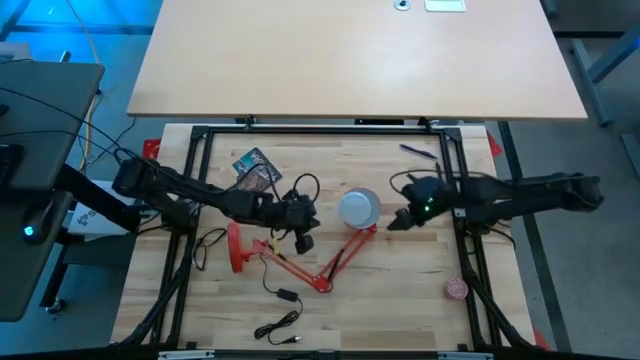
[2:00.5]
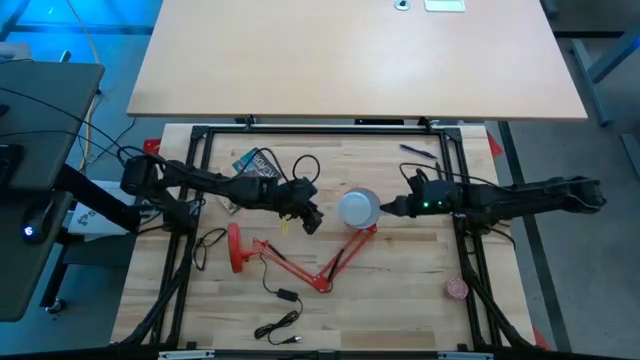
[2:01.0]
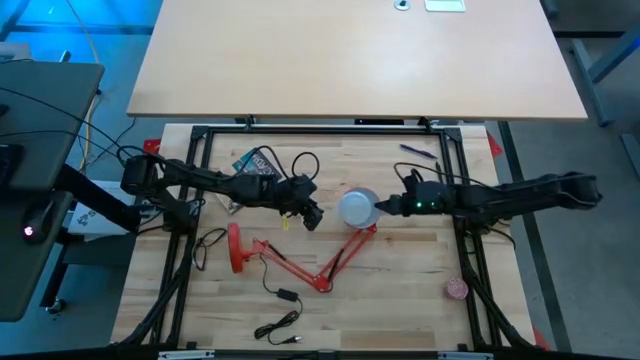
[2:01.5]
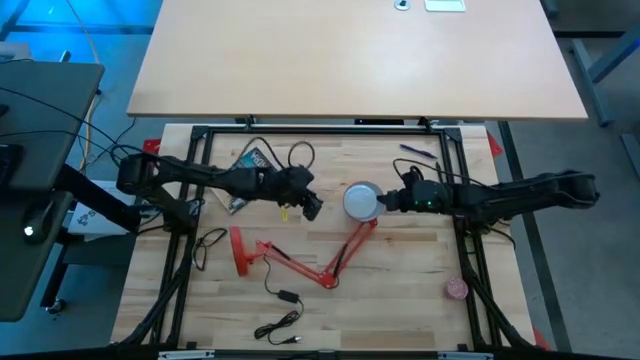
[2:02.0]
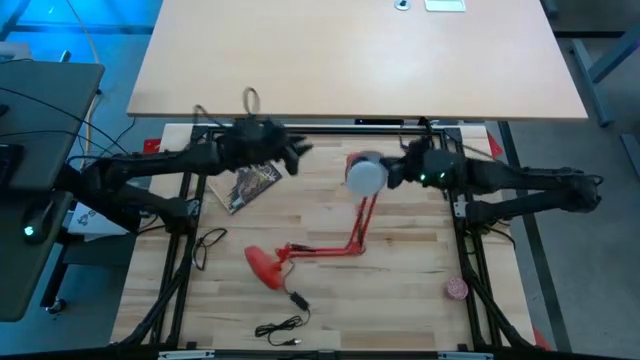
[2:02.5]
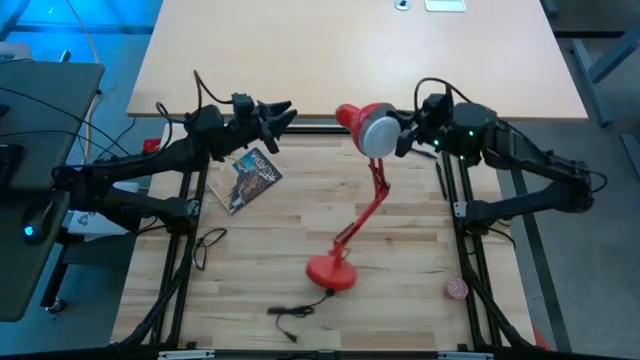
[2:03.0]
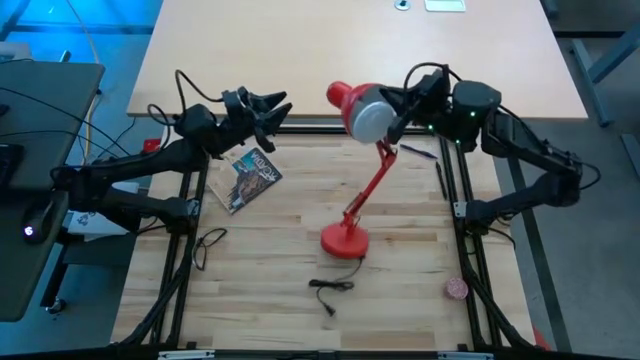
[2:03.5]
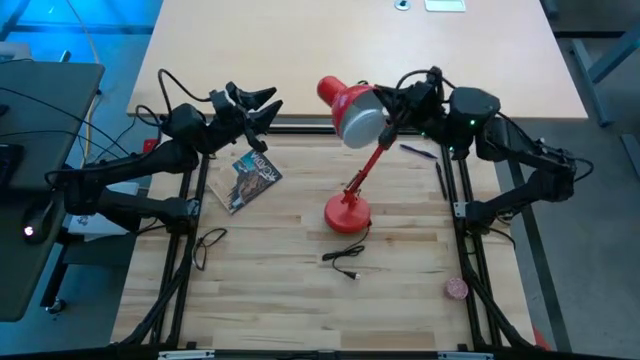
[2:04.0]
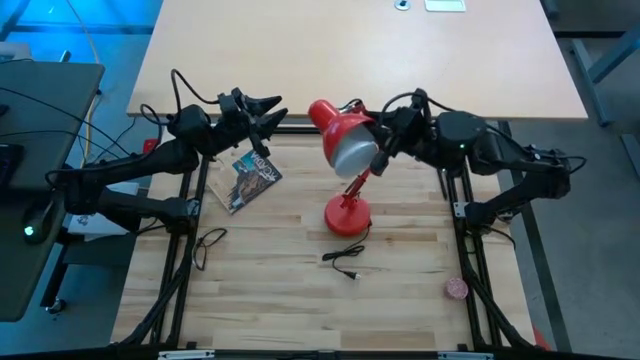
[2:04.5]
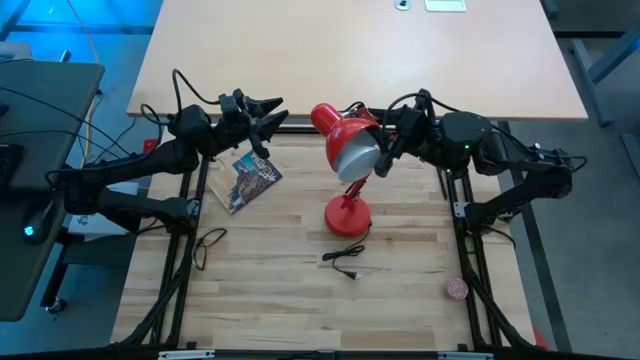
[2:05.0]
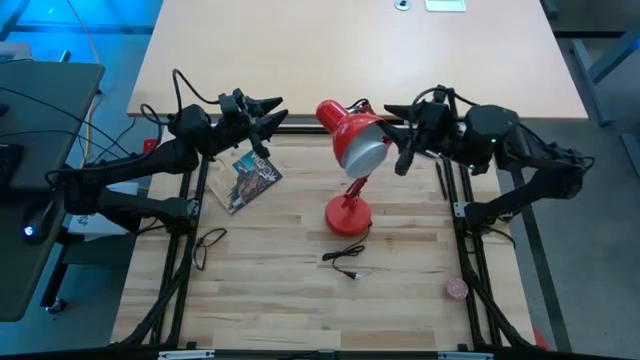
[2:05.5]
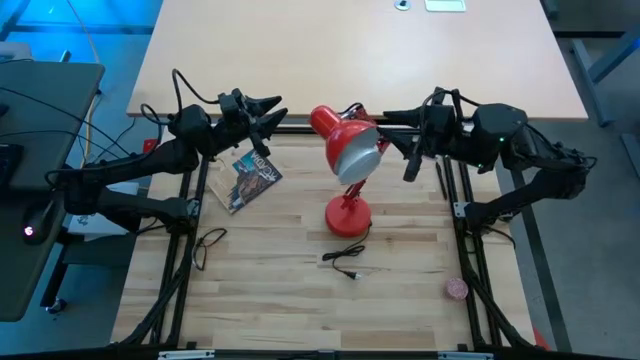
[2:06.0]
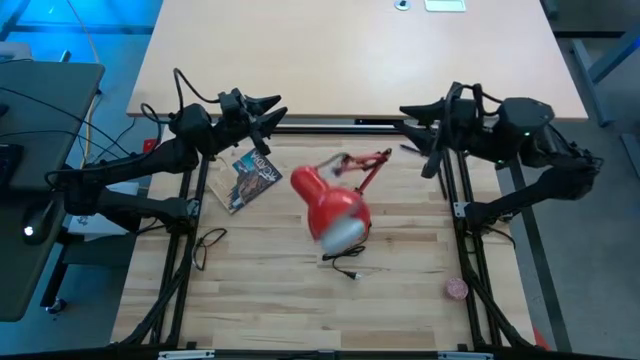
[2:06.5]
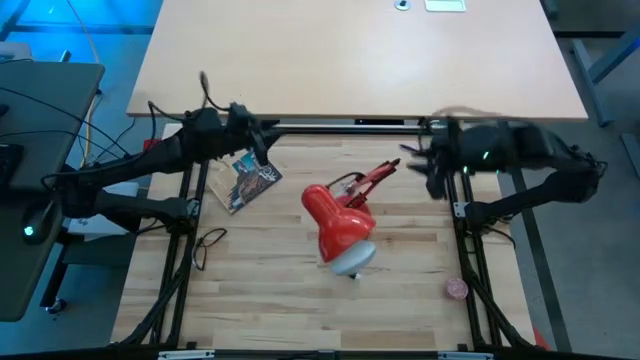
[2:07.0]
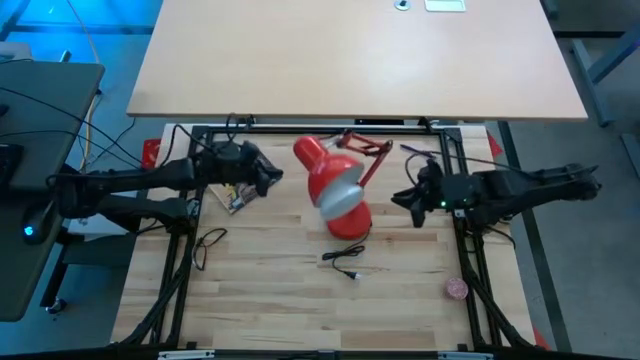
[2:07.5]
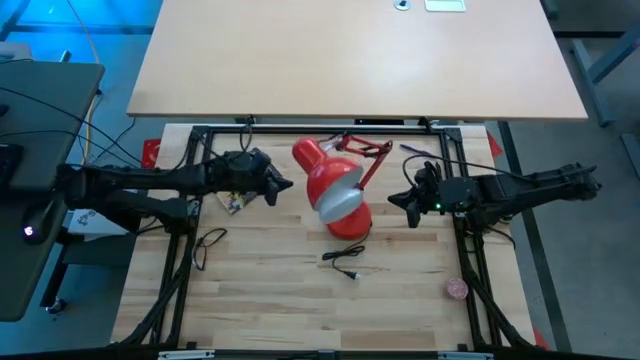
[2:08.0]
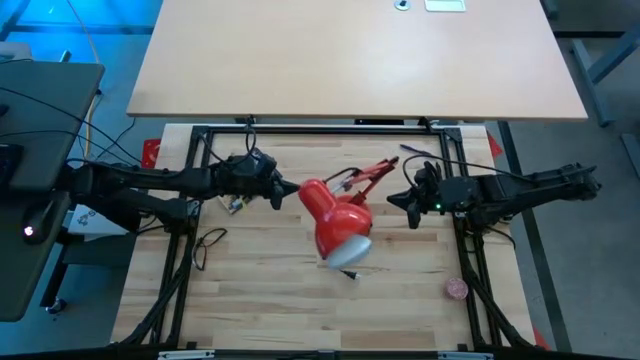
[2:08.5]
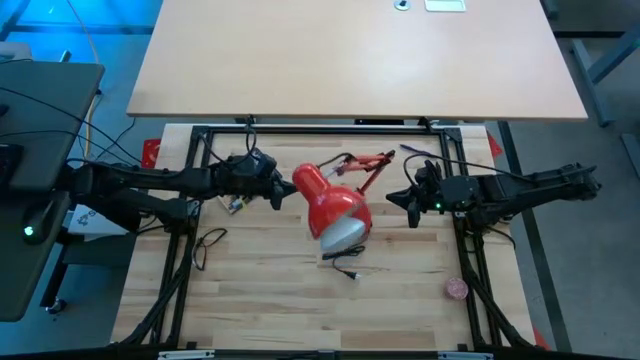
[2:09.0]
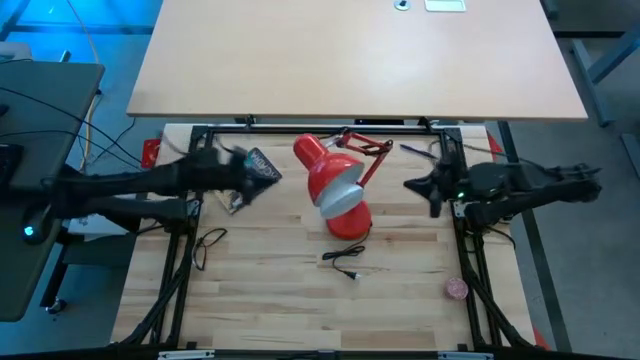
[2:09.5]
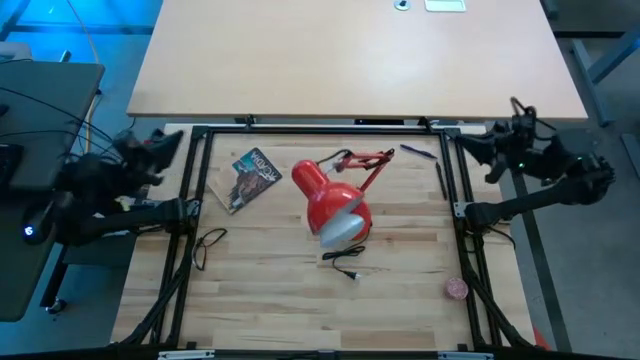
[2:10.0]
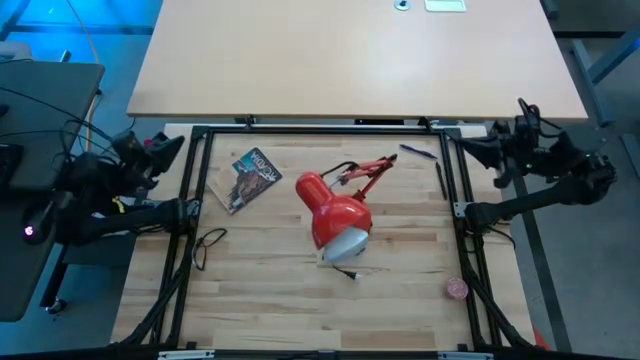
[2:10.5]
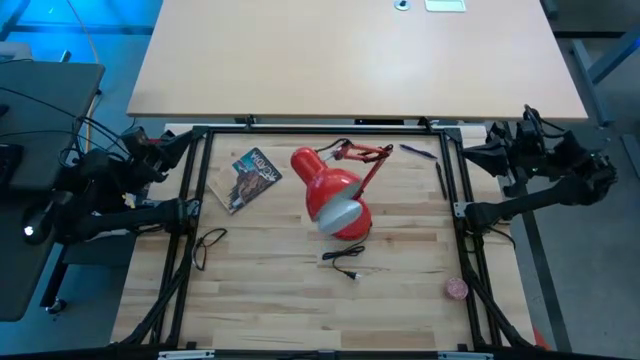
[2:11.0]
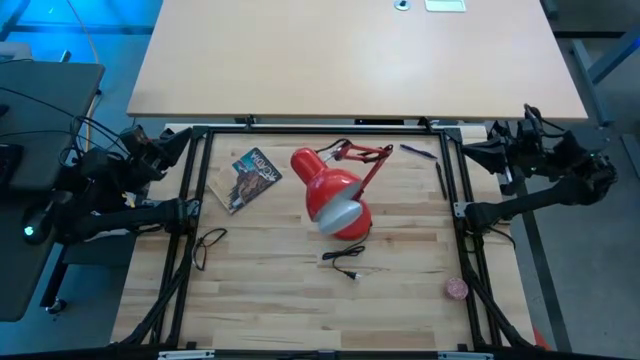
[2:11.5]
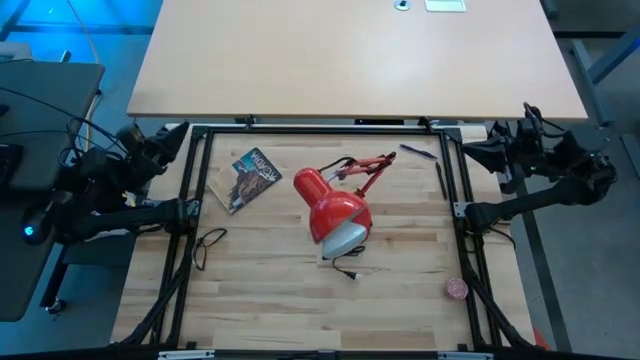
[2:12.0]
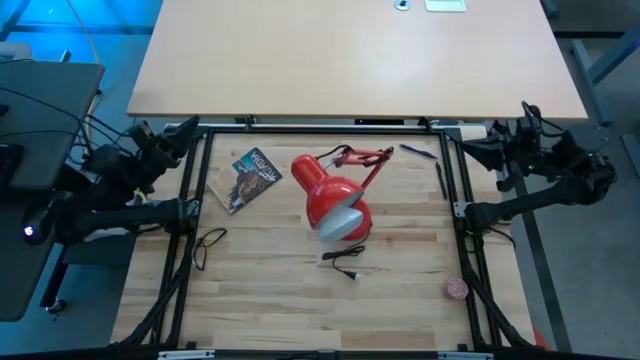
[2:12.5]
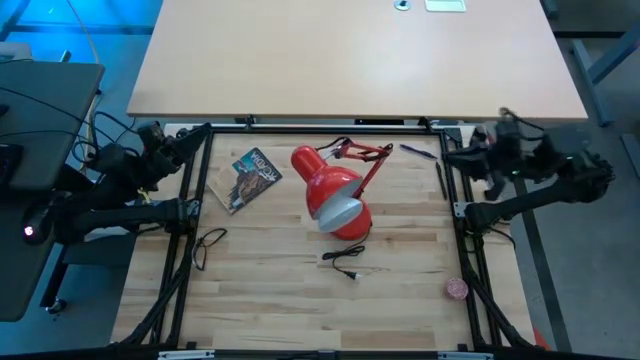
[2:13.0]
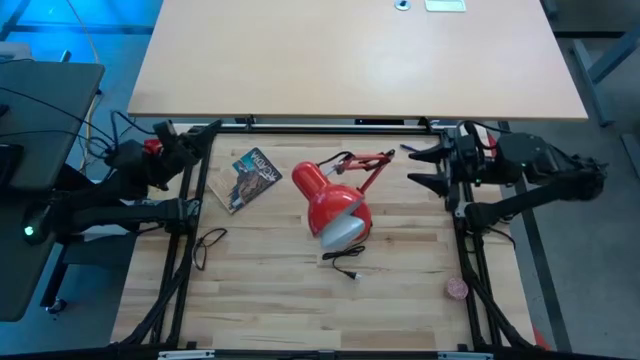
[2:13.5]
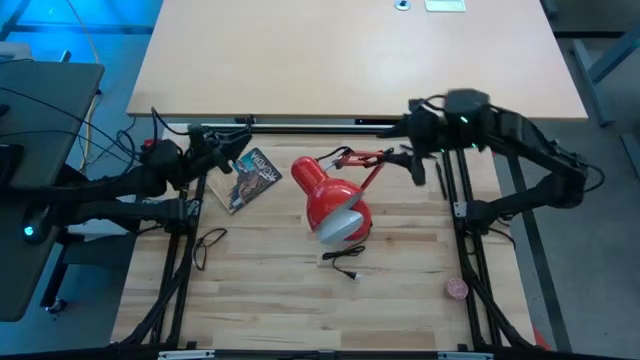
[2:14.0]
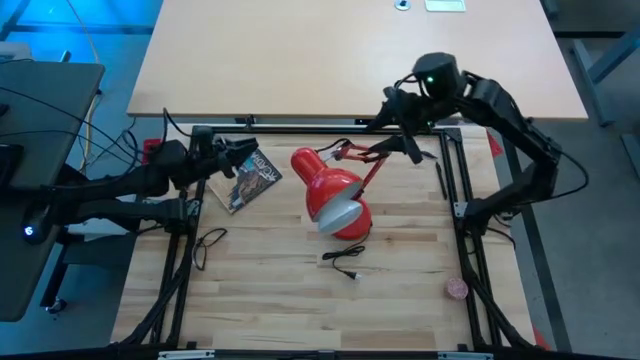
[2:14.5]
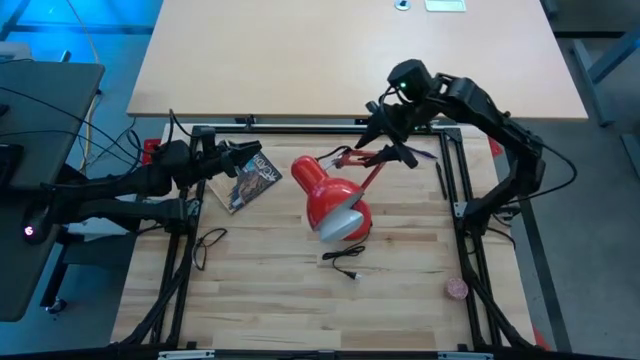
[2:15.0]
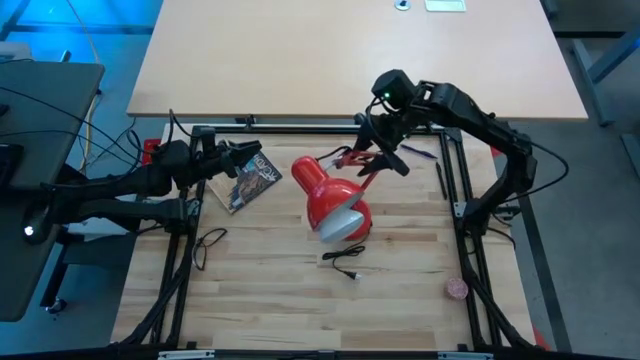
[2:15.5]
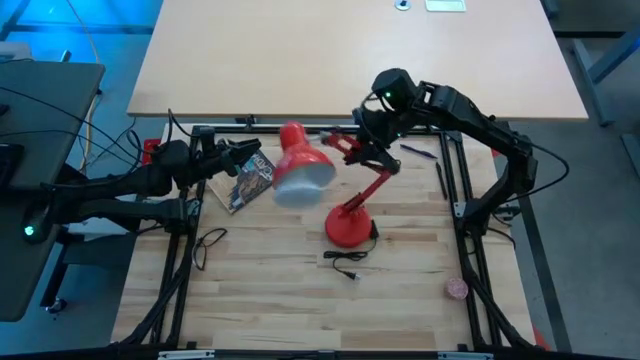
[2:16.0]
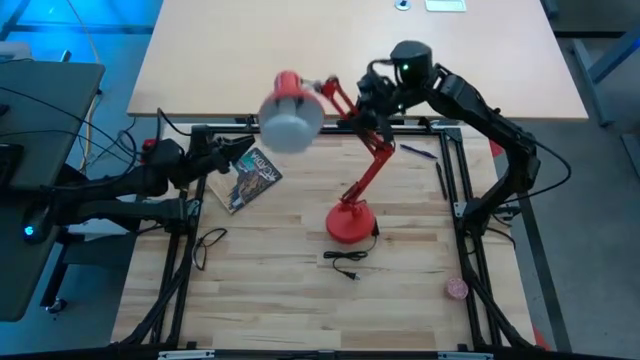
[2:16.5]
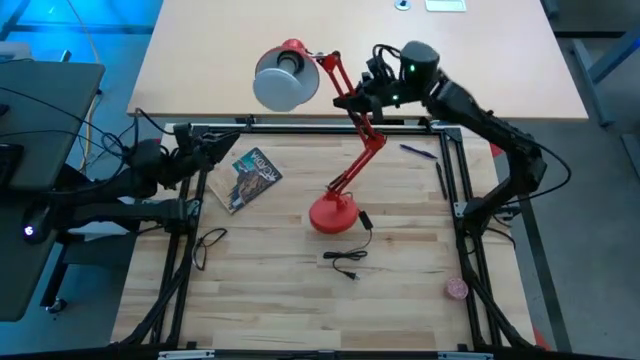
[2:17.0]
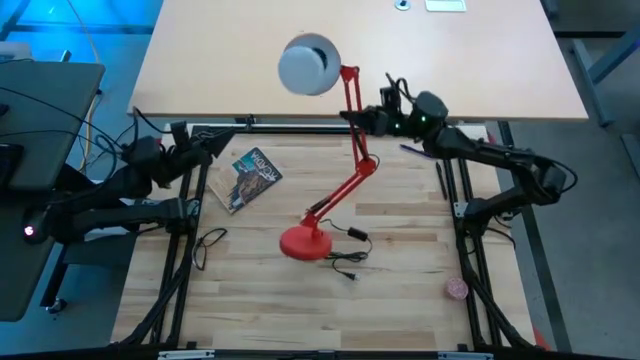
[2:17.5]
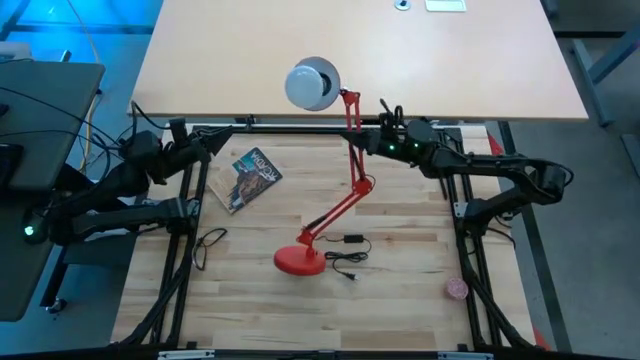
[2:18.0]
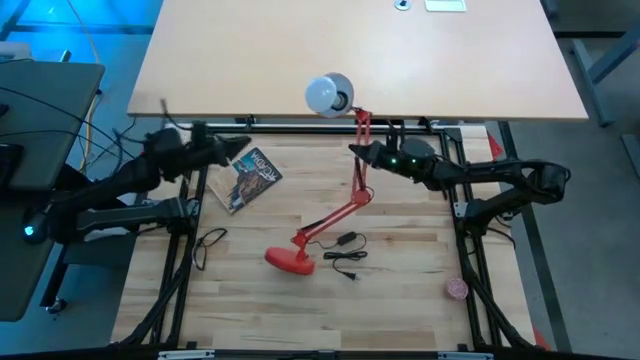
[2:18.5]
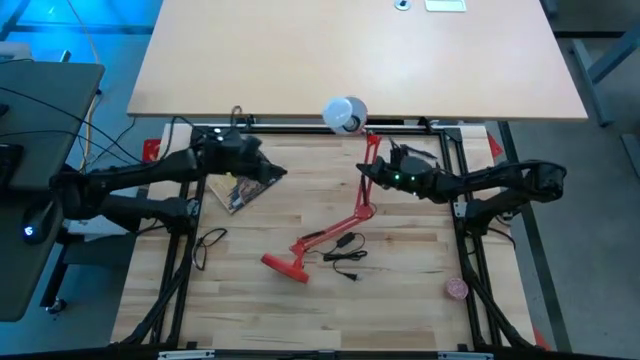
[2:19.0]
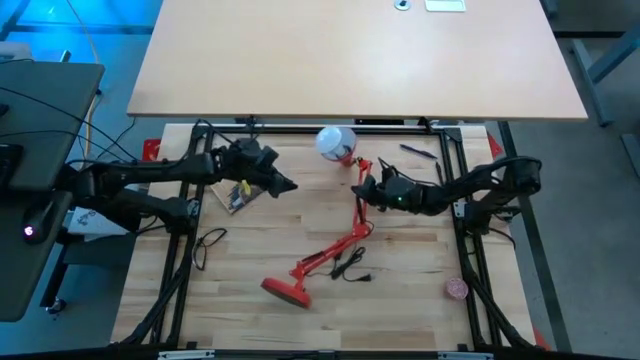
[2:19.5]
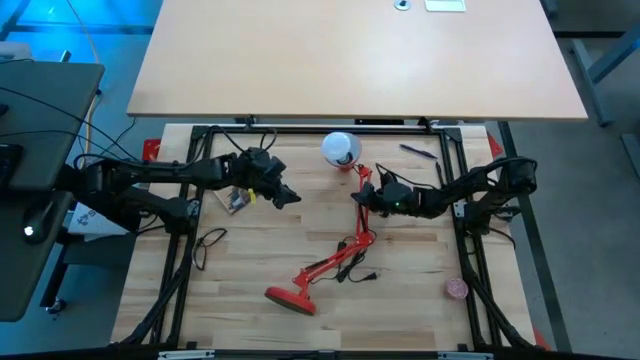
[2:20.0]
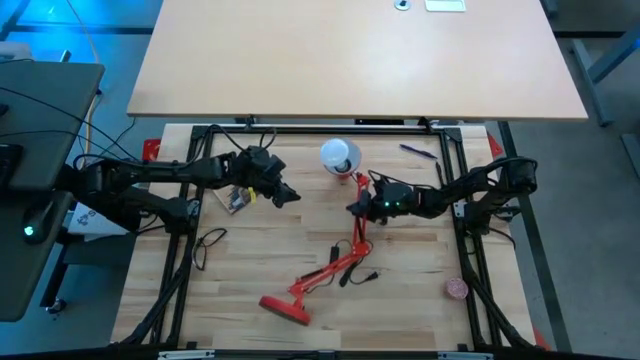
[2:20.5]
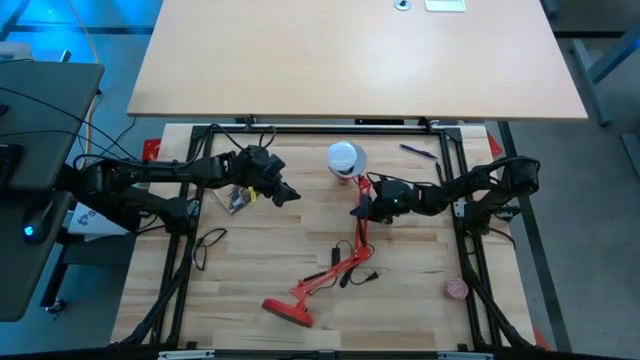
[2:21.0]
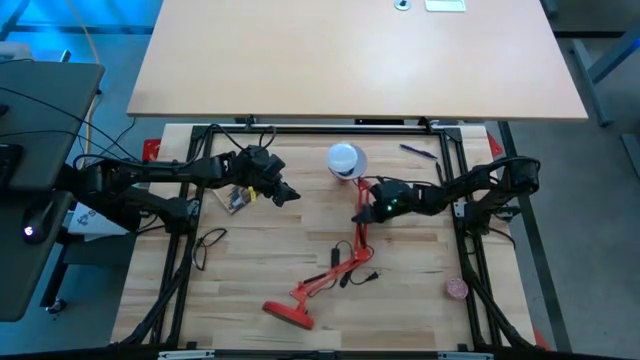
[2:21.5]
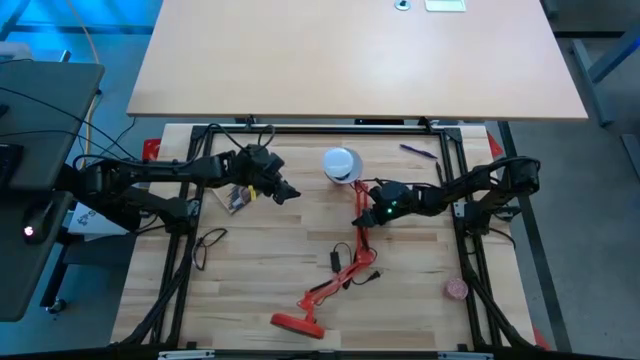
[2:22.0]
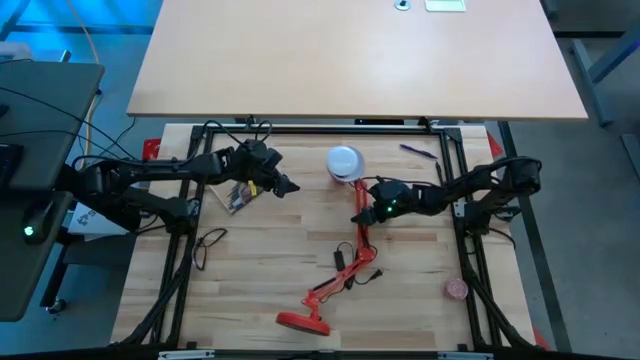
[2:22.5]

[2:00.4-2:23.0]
Task: Screw lightbulb
Insert the lightbulb into the red lamp
